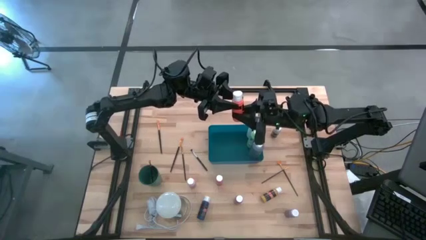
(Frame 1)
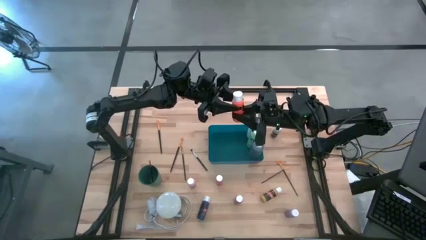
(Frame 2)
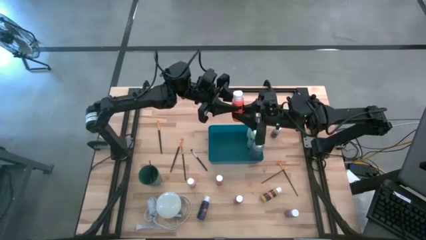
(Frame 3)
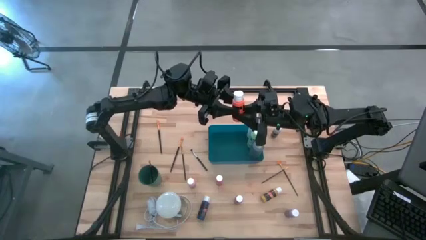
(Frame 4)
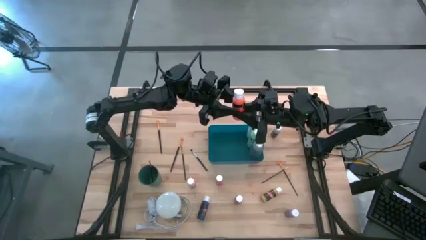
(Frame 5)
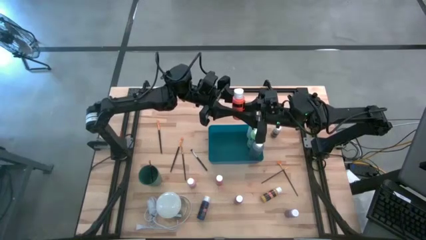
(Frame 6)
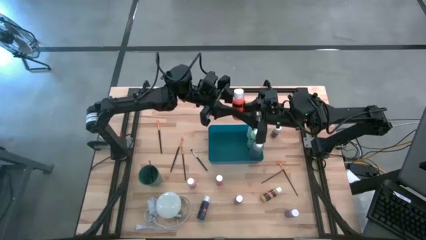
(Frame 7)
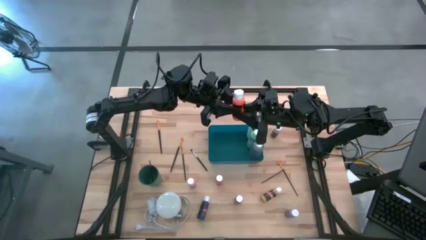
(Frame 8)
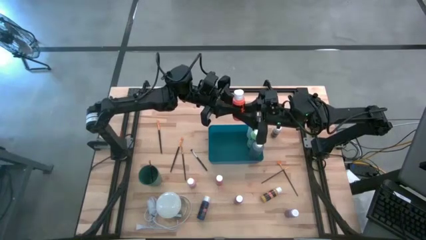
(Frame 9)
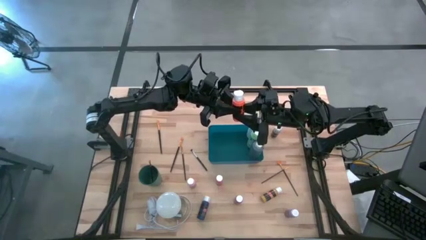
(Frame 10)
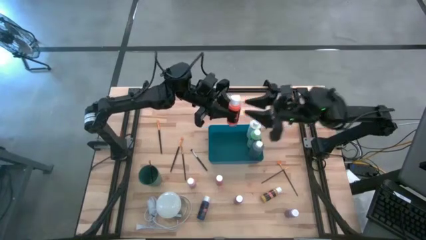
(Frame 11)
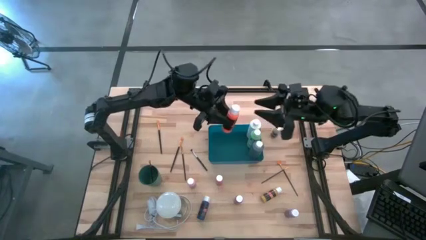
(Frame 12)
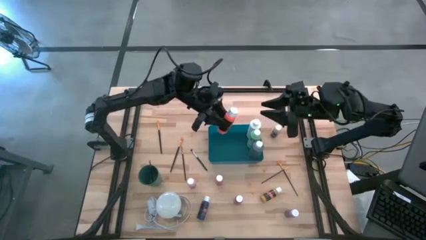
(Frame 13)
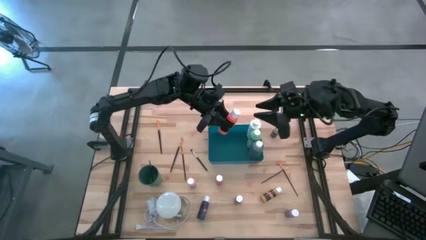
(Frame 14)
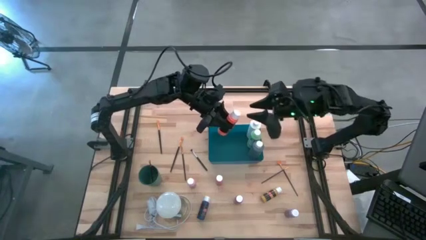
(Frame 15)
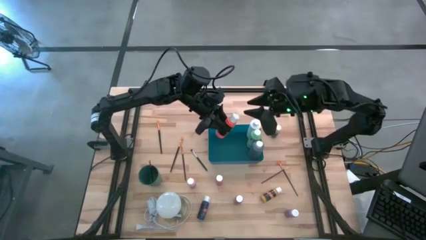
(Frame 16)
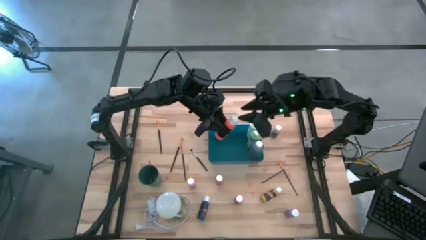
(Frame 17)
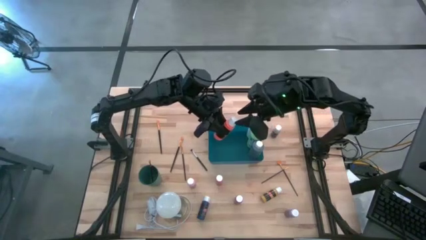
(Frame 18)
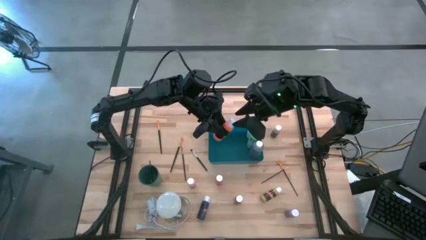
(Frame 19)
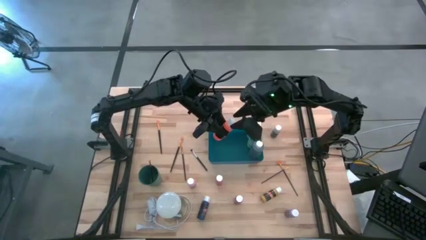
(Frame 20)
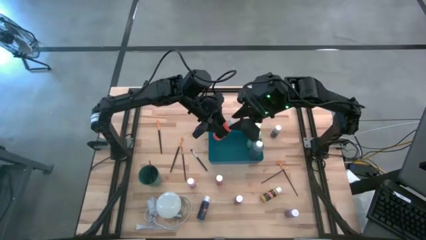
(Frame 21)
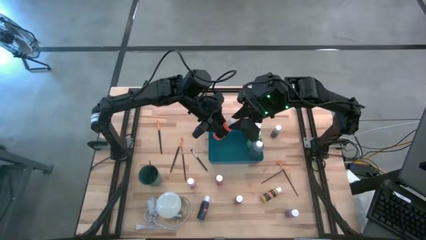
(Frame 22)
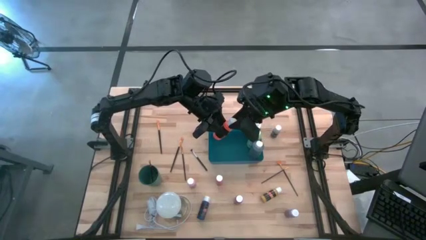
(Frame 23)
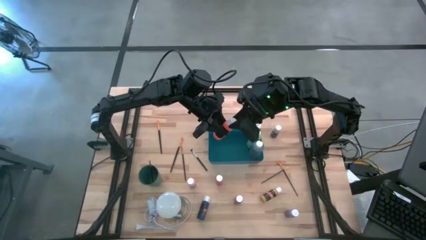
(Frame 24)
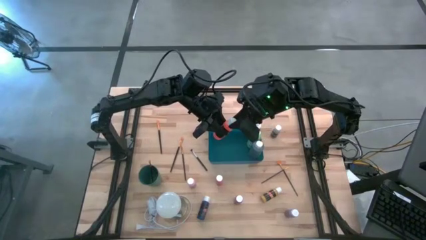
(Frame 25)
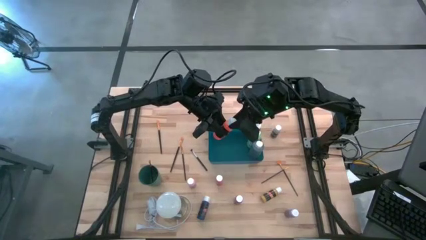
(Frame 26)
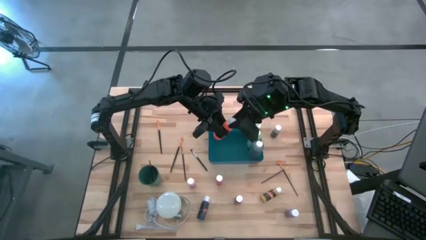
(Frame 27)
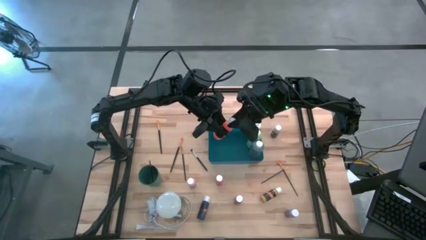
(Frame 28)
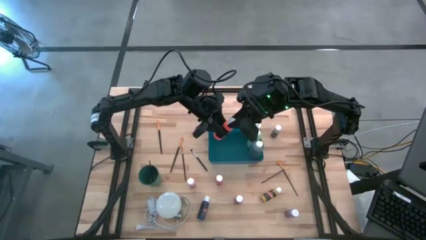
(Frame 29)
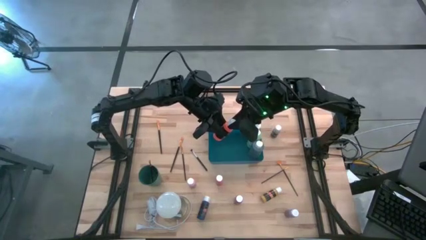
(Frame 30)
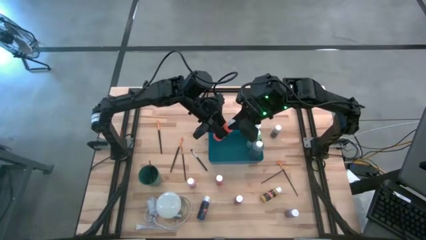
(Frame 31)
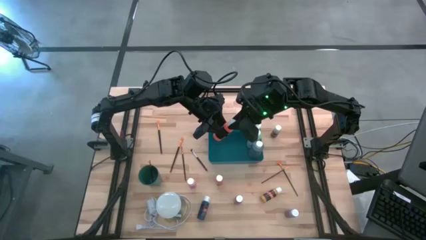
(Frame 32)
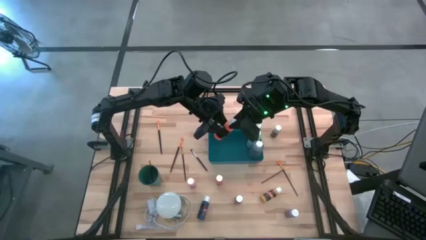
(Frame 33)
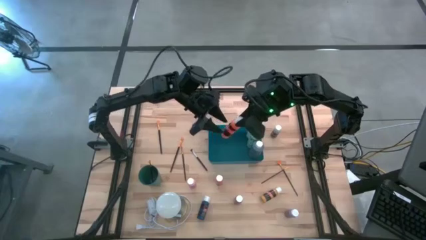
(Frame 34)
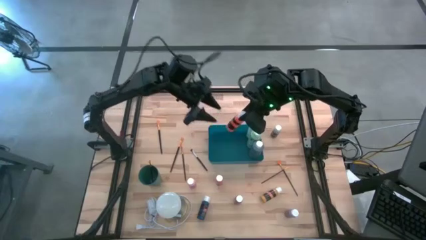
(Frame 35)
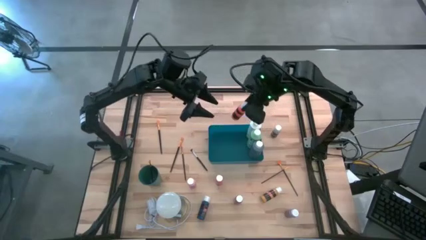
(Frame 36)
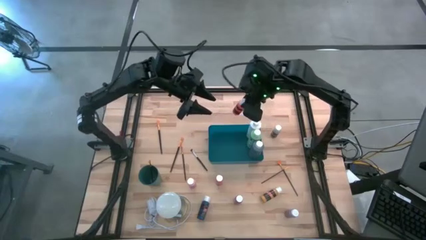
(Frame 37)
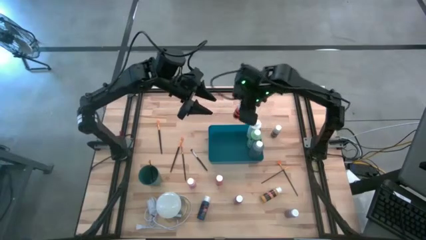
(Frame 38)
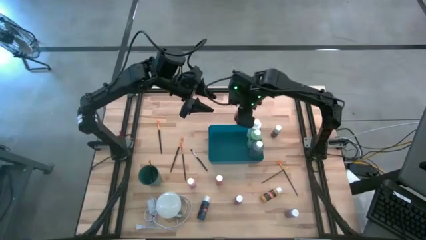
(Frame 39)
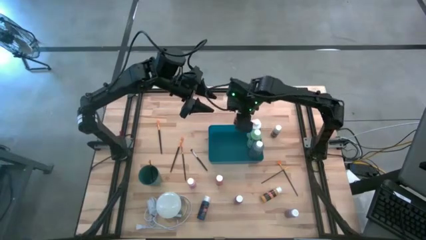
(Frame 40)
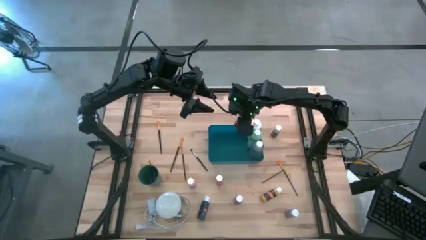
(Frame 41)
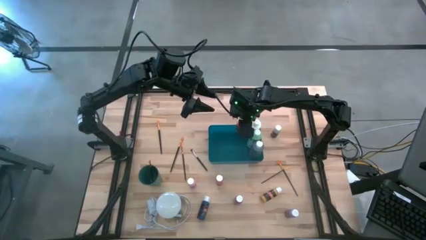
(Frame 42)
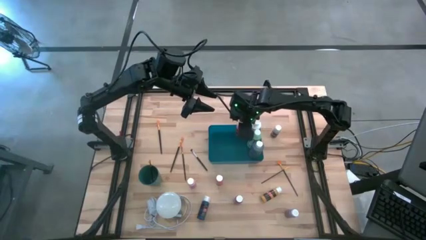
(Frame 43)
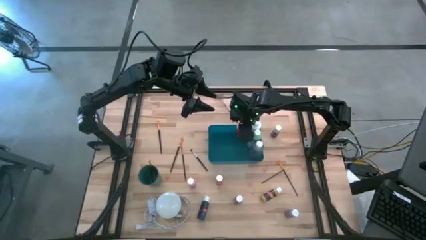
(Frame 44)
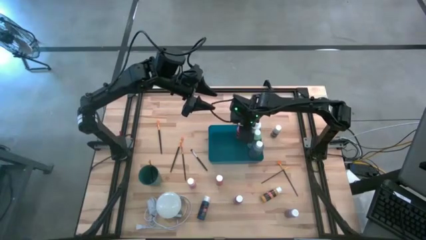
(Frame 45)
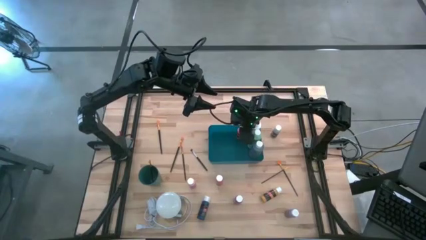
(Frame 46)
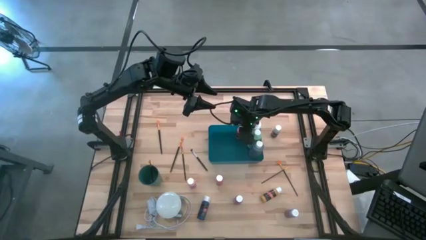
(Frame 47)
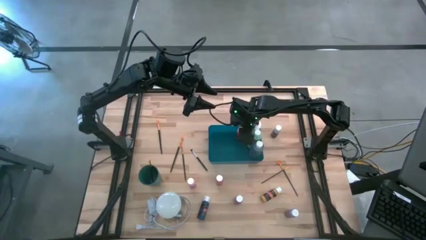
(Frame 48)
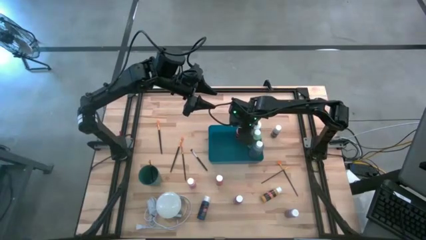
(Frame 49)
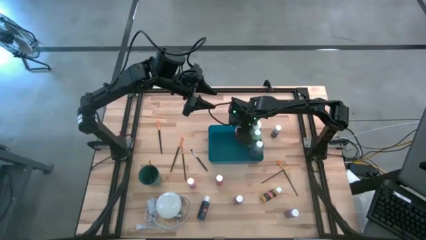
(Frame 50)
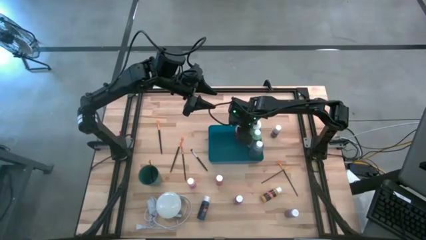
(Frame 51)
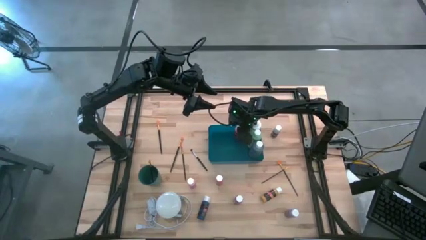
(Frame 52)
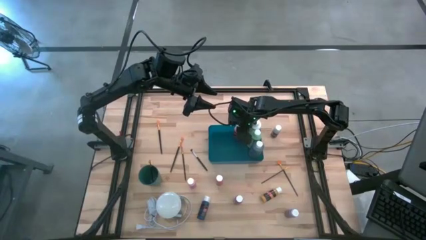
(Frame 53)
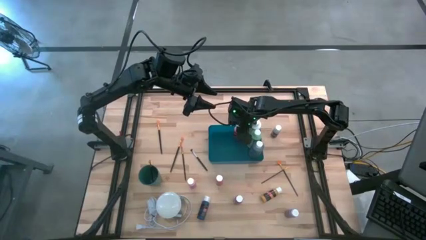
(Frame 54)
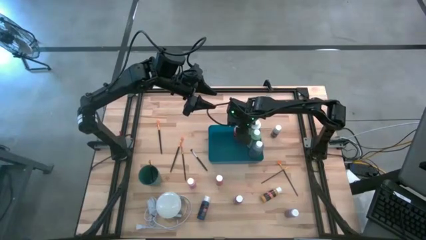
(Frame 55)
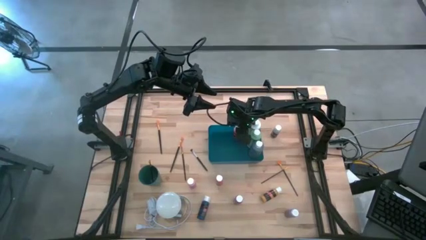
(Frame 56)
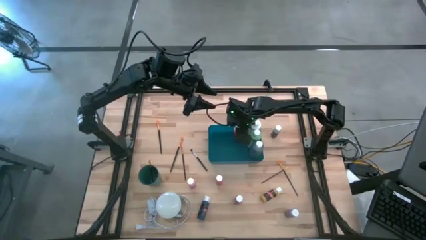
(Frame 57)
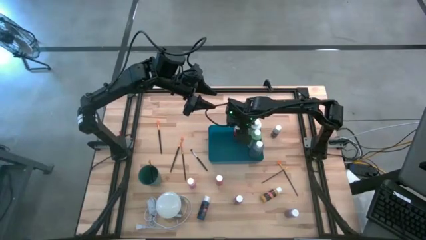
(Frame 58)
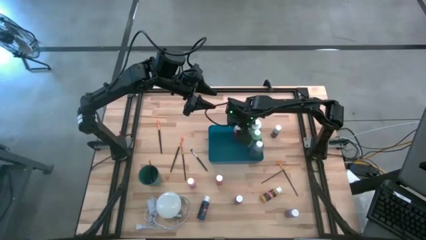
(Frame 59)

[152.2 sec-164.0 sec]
Task: Pick & Place Paint Supplies
Put the orange paint bottle into the blue bin

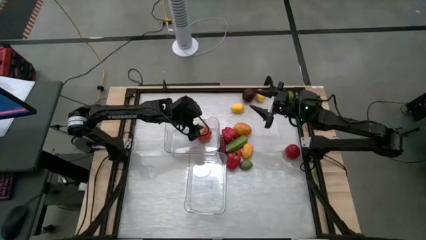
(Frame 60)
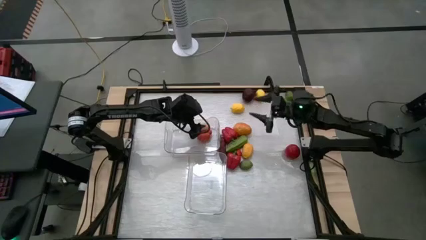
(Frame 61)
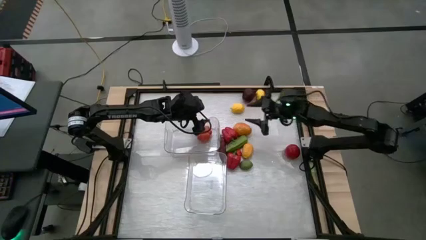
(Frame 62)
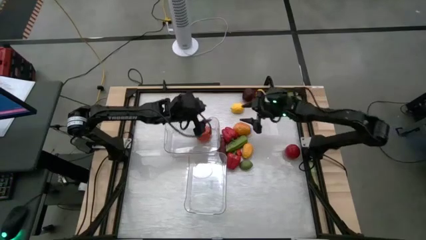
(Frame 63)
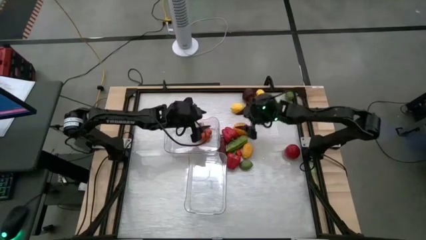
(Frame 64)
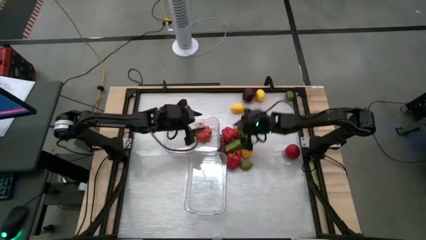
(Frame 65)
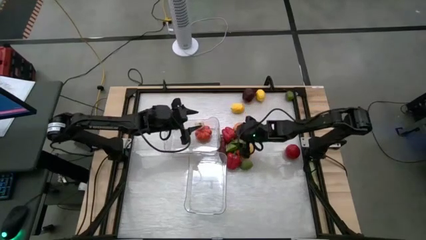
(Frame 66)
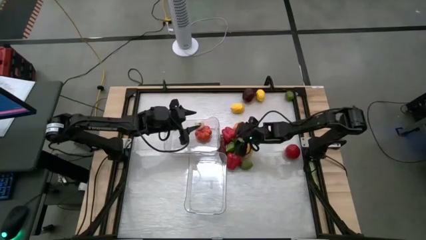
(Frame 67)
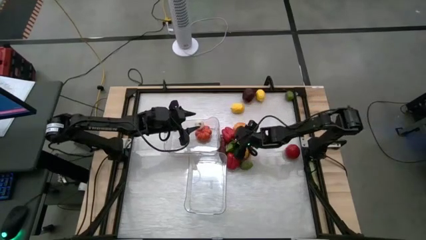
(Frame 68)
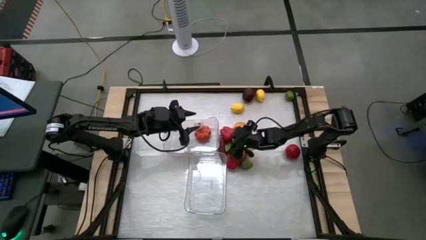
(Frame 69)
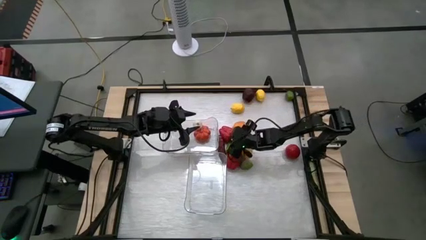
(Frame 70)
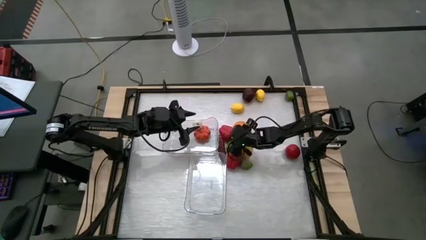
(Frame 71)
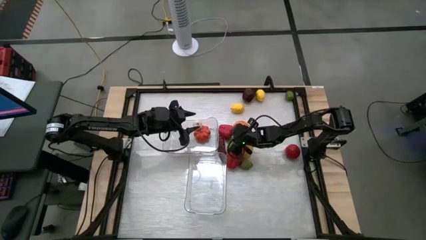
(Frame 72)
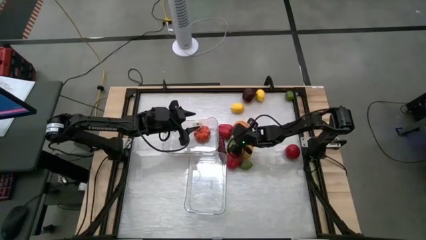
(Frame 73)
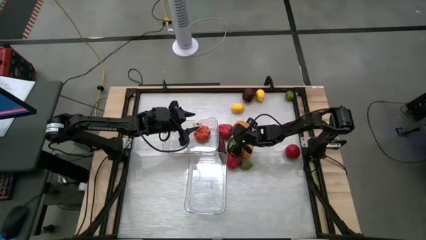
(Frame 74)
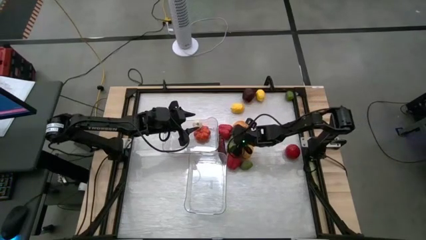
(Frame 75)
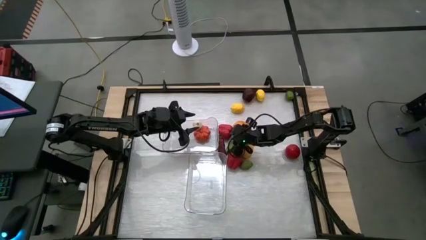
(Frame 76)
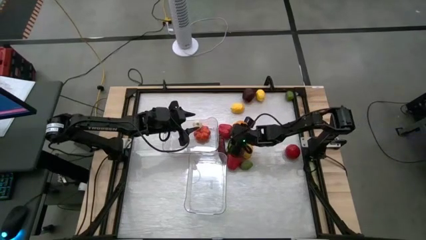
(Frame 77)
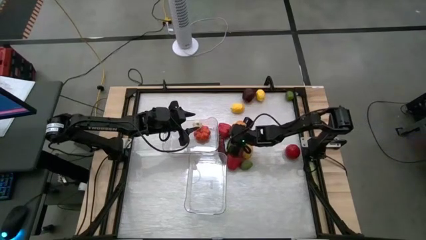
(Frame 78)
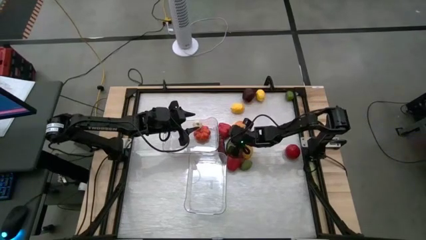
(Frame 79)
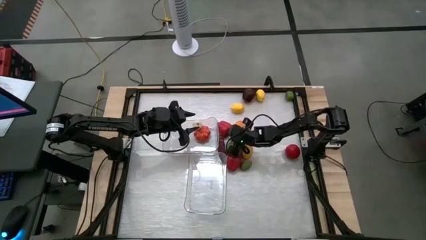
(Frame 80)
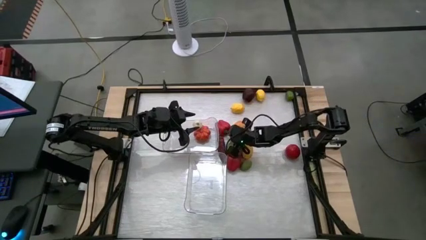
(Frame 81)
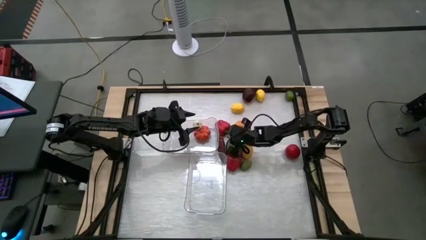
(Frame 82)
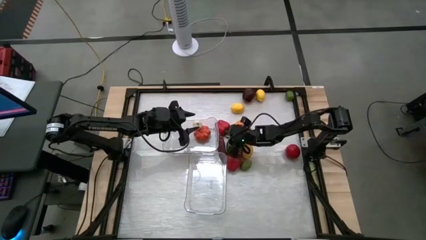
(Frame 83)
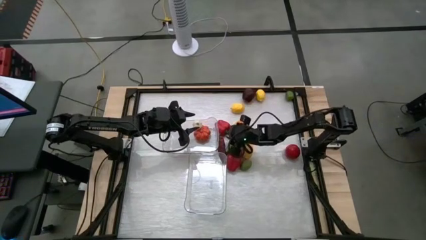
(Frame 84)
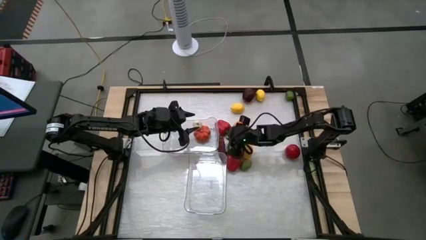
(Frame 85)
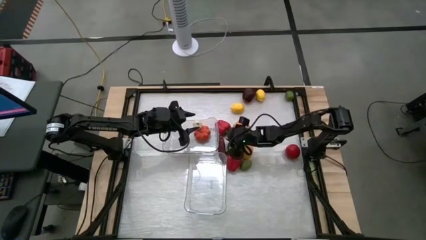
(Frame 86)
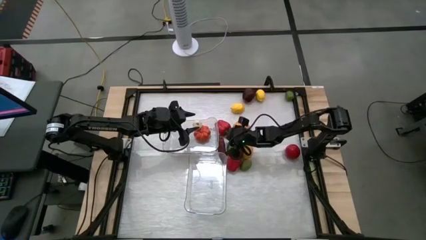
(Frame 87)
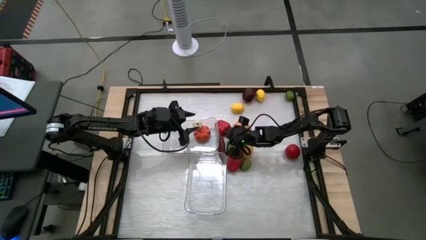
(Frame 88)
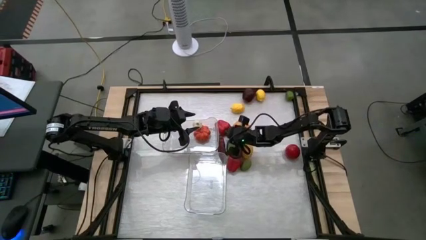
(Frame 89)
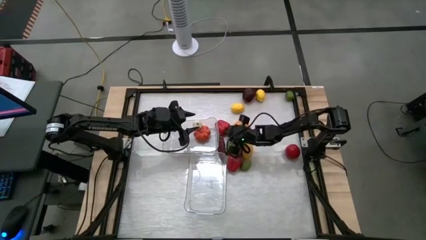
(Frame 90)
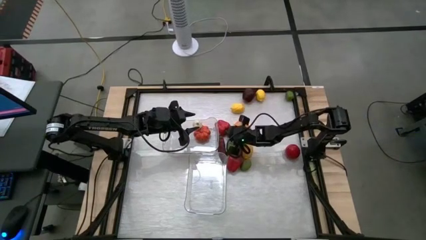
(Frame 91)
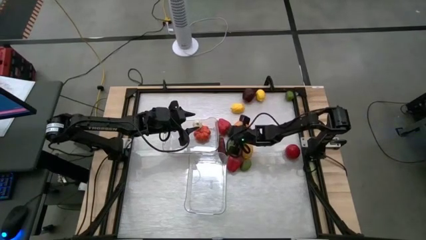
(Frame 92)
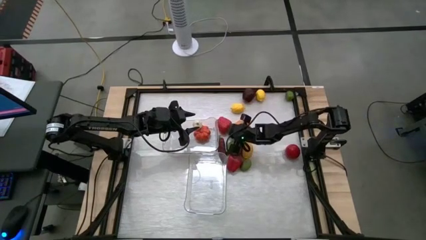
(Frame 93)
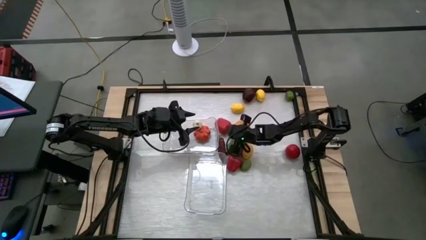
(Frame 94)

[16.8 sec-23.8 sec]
Task: Sort produce into baskets
Put the top red bell pepper into the top transparent bin
